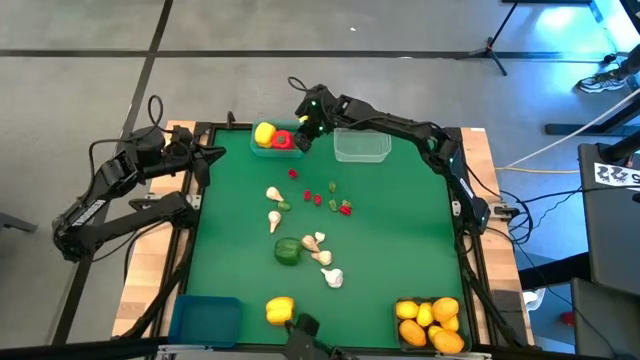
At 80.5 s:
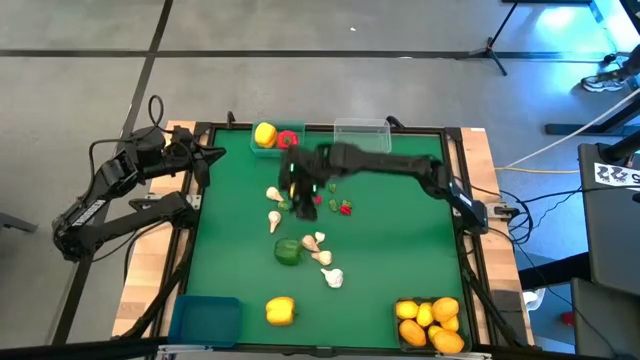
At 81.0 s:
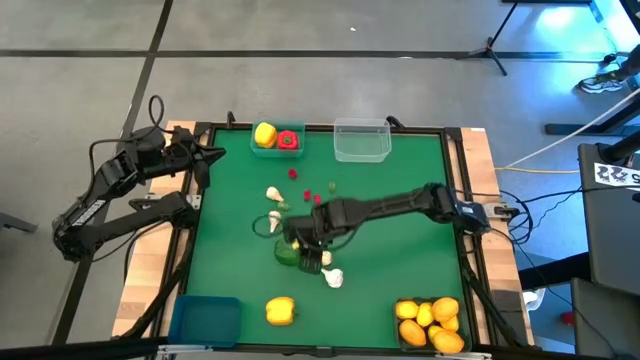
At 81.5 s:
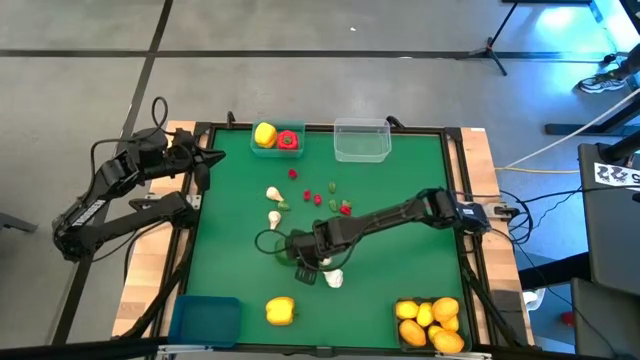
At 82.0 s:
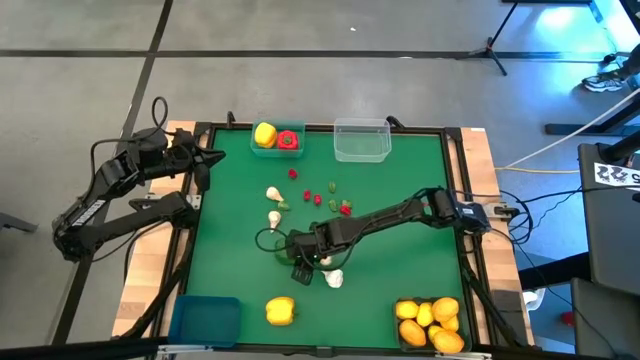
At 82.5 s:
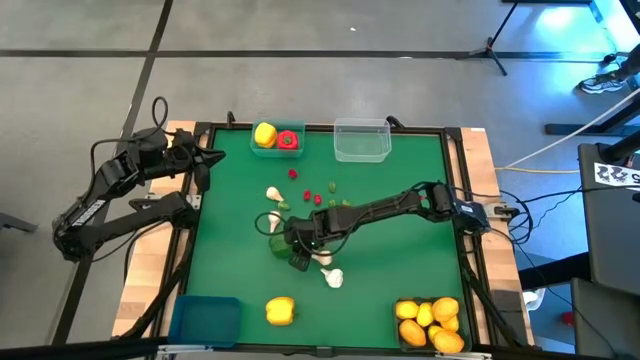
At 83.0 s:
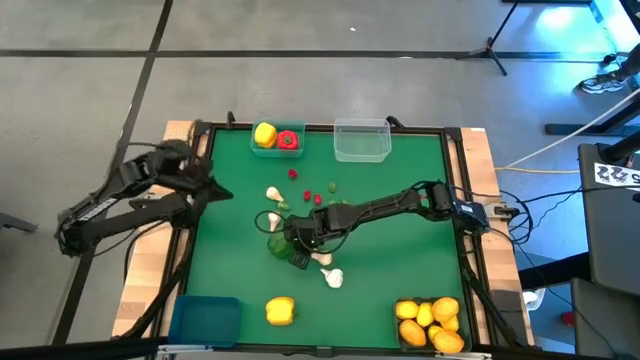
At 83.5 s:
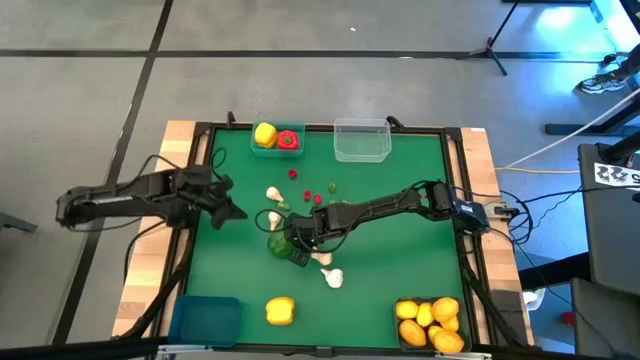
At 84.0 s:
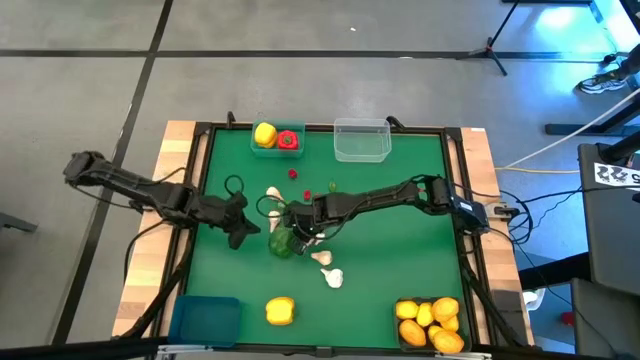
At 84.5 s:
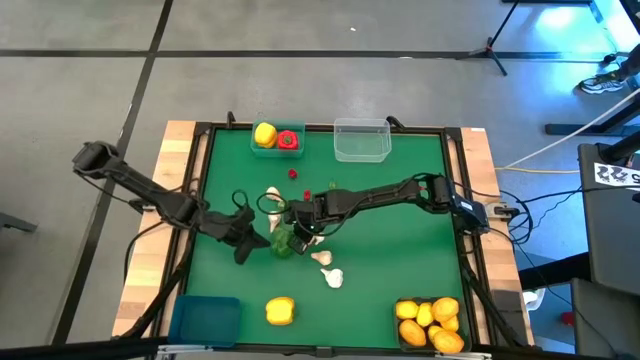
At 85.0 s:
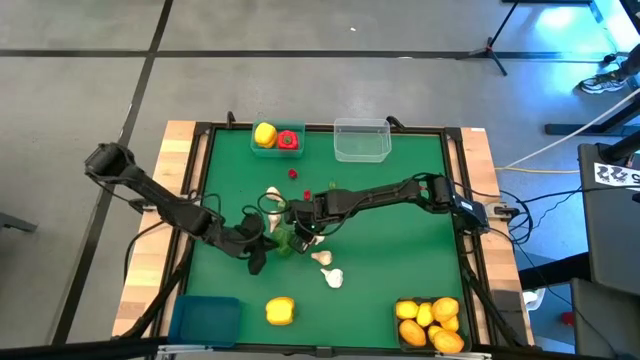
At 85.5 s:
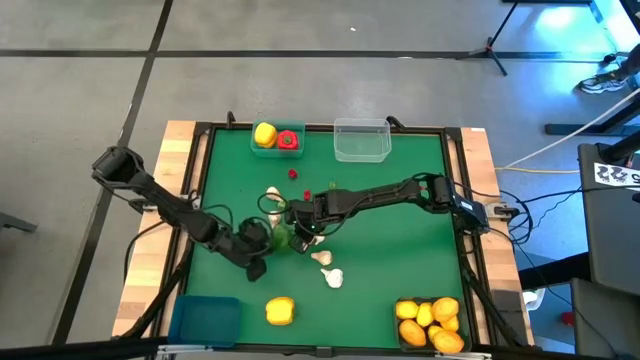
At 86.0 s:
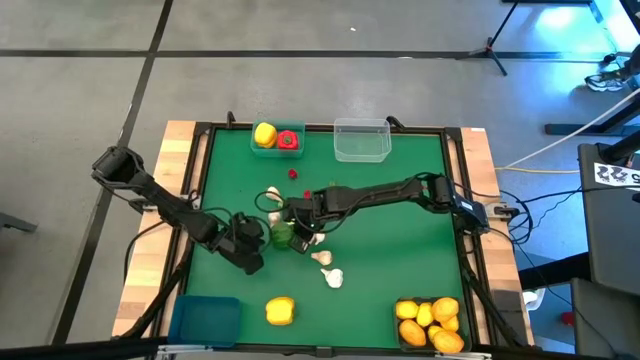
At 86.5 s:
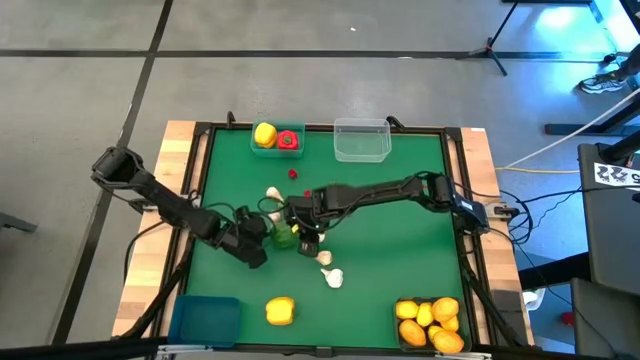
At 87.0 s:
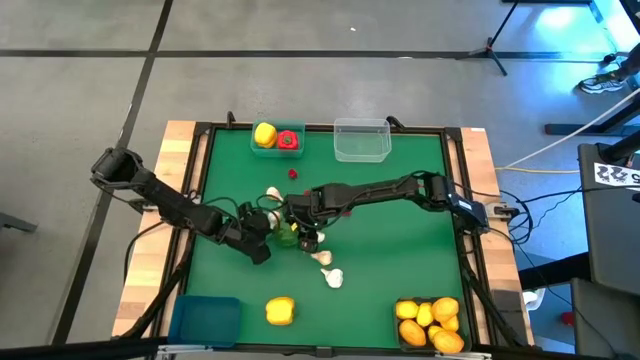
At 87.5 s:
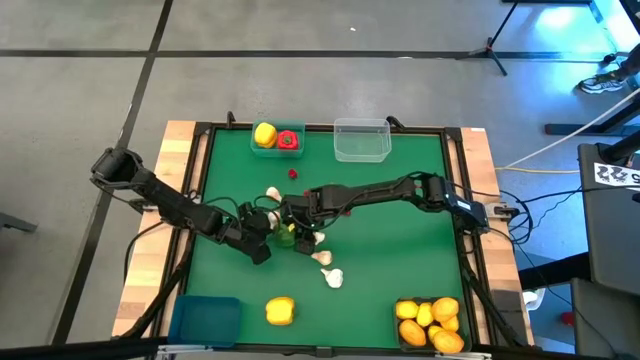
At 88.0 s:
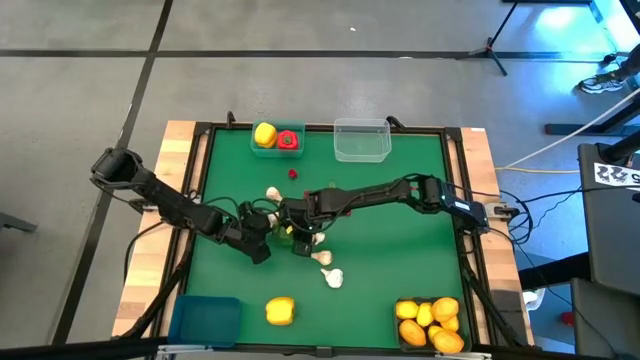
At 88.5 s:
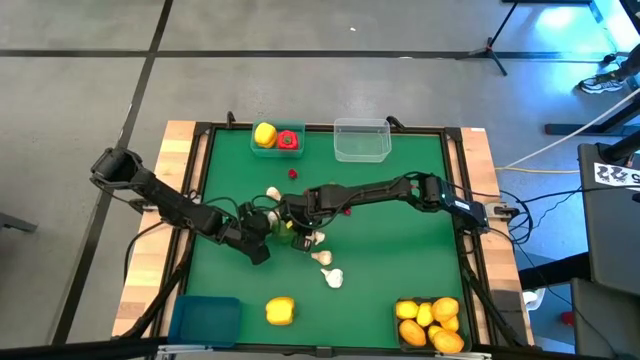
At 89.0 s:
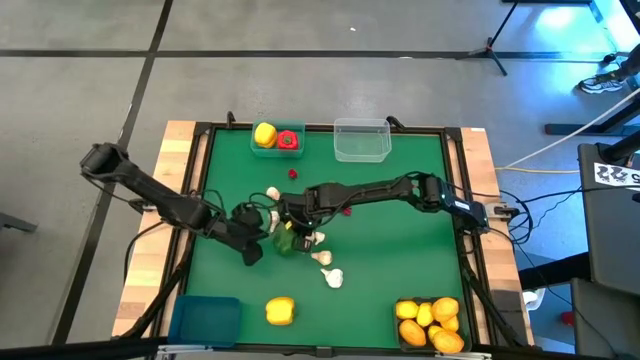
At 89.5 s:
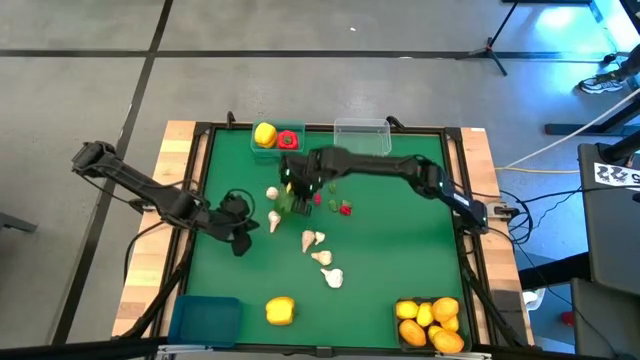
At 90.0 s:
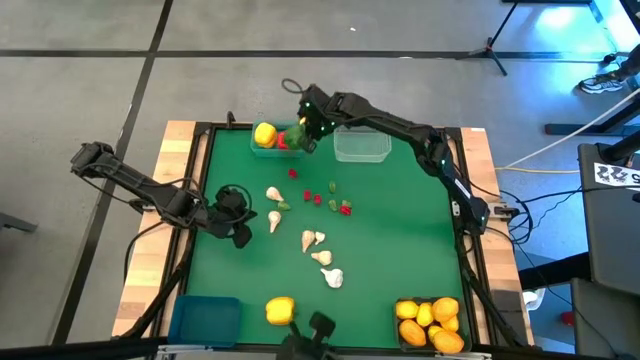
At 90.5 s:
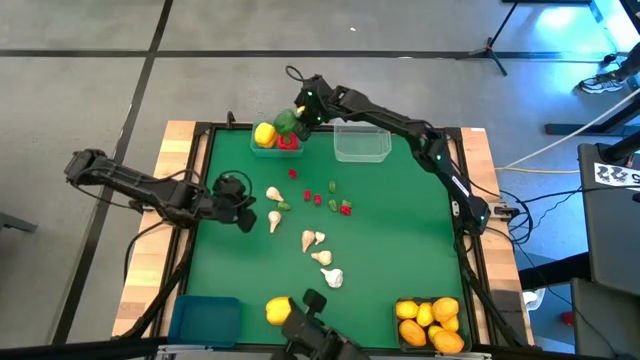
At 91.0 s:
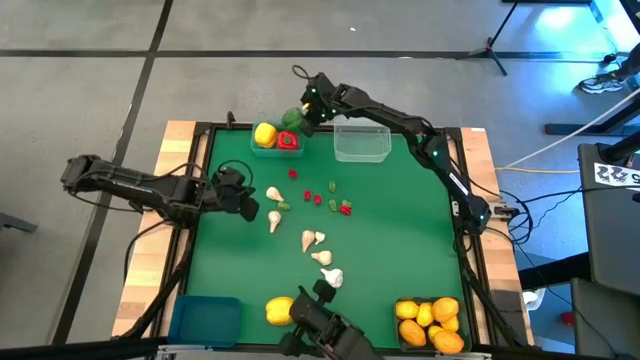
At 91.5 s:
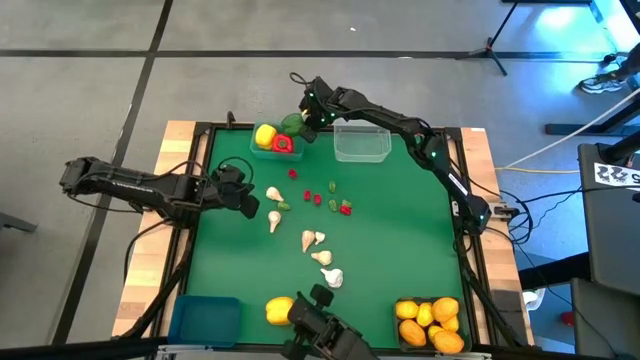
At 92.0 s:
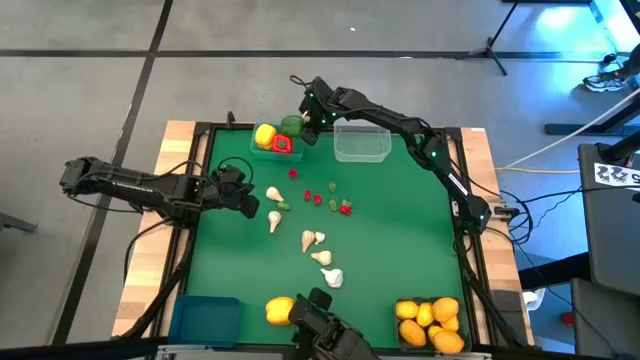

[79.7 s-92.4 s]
Task: Sort produce into baskets
Put the green bell pepper into the green bin

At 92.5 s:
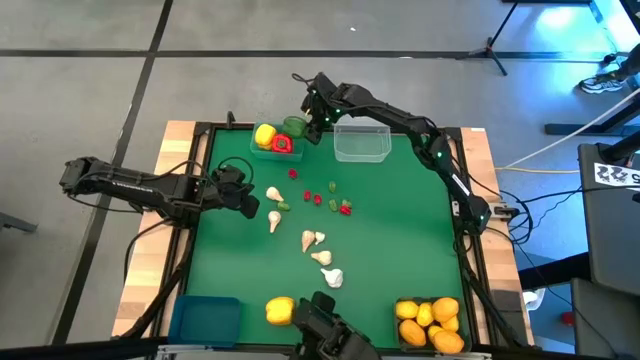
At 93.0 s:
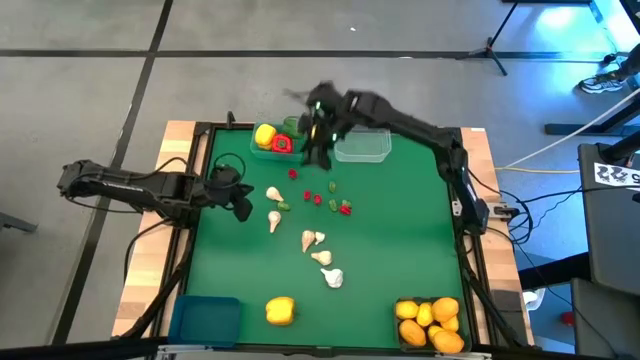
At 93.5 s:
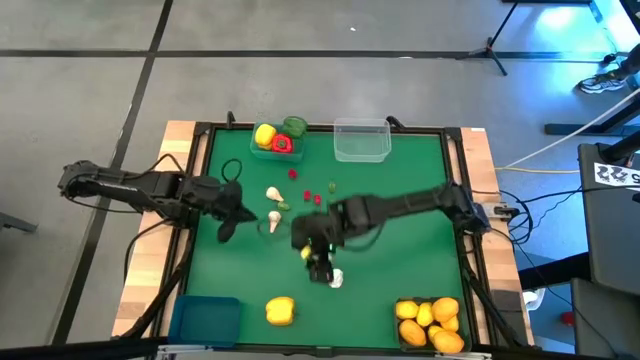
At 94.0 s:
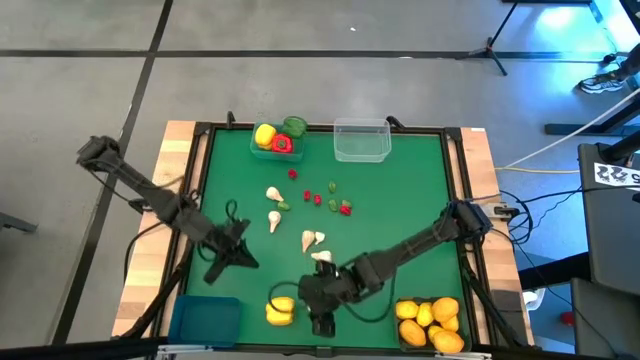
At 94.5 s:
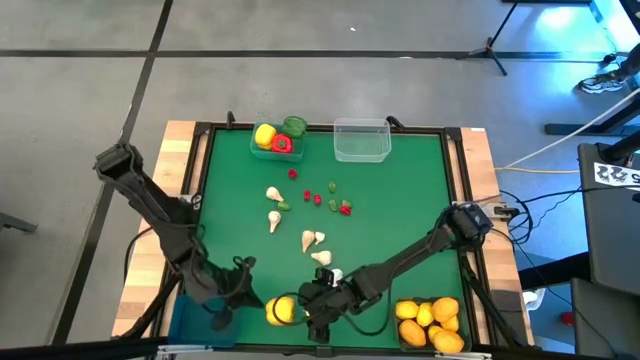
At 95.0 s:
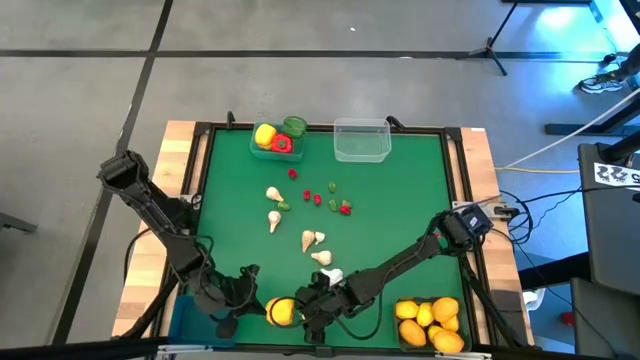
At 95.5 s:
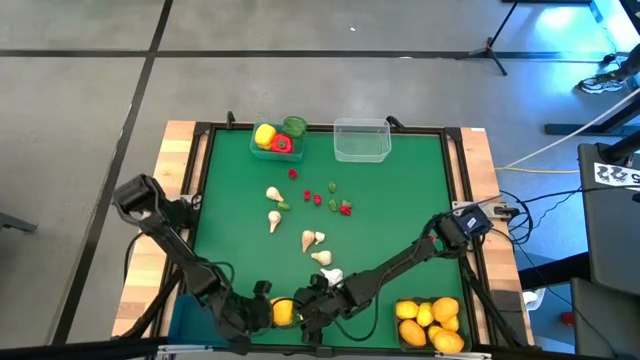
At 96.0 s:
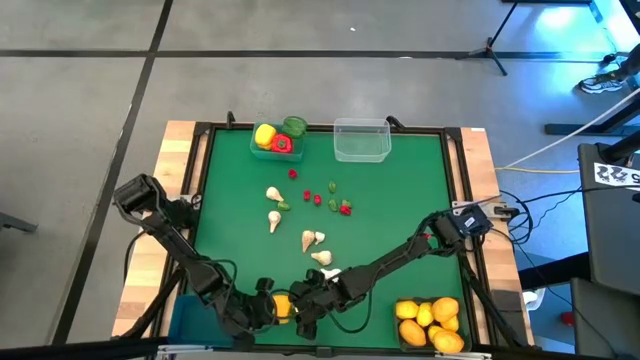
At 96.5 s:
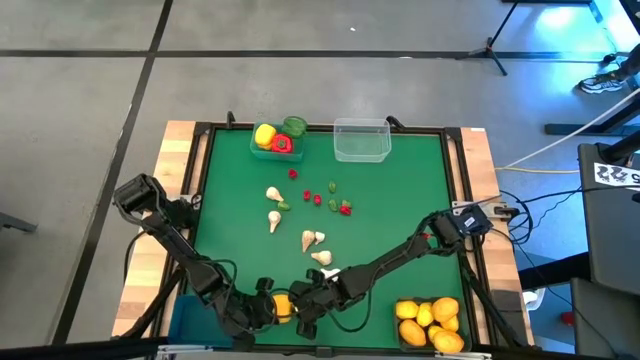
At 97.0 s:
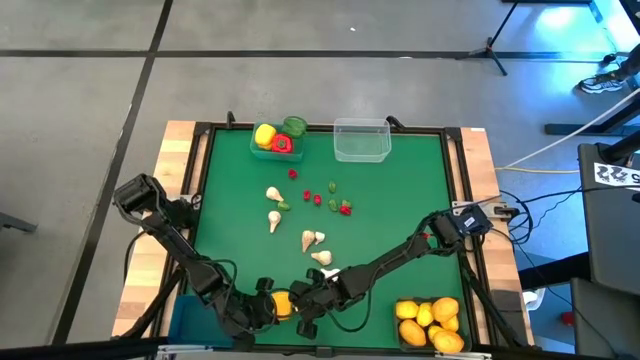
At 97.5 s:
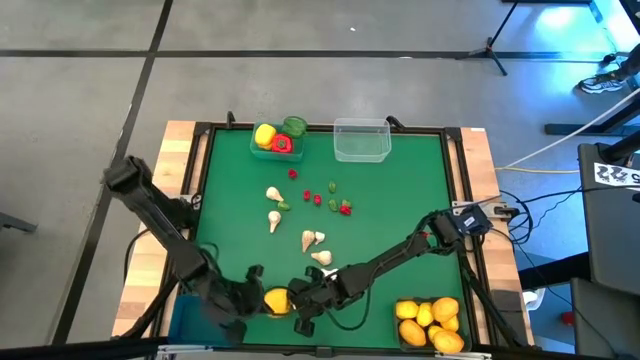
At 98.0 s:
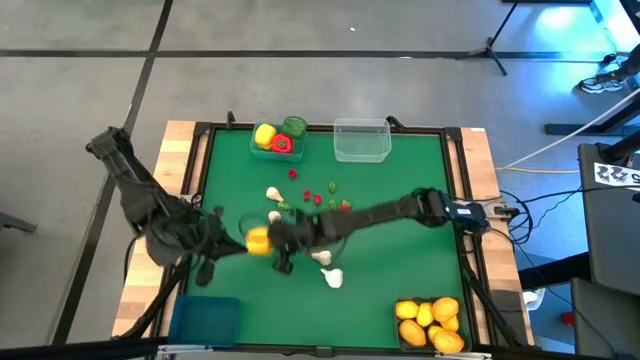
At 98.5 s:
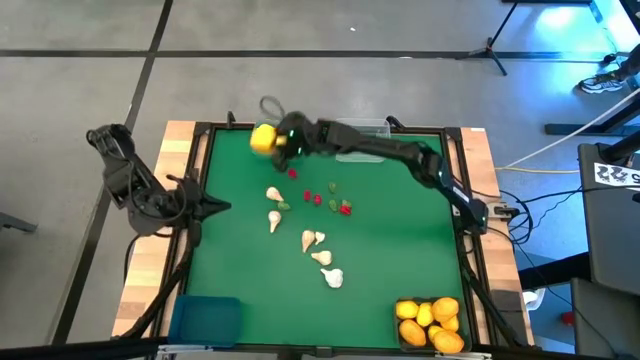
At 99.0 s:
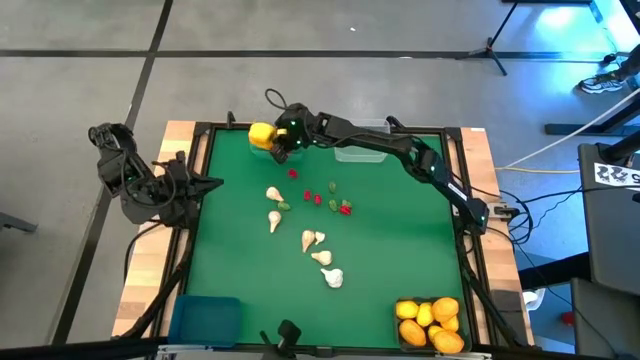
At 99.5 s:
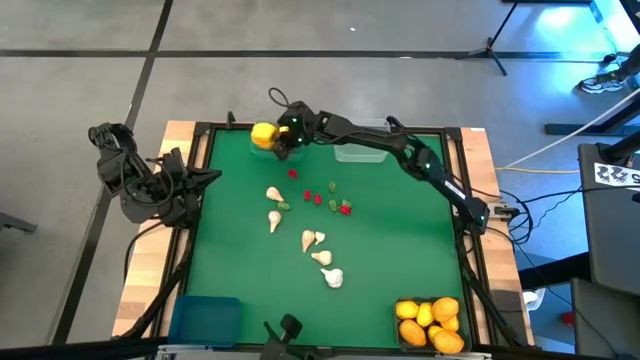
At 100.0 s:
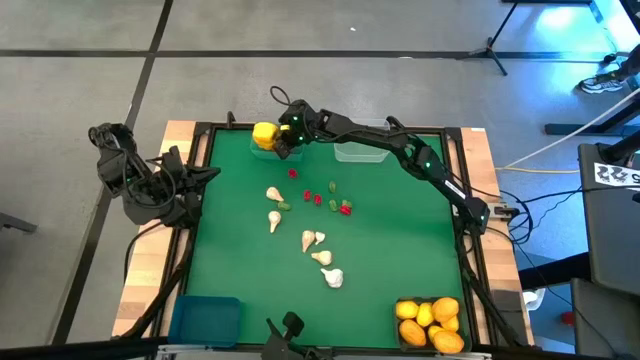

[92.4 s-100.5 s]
Put the yellow bell pepper into the green bin
